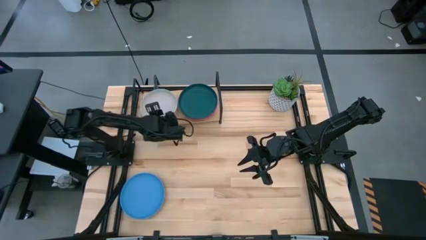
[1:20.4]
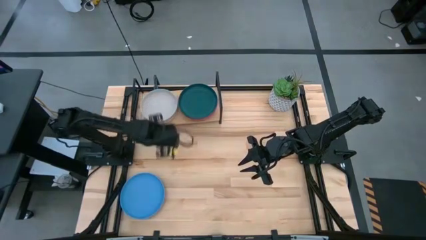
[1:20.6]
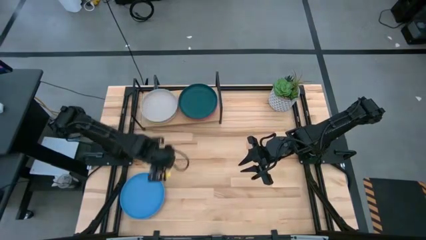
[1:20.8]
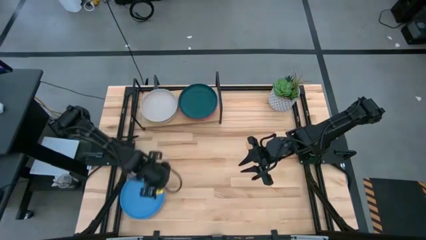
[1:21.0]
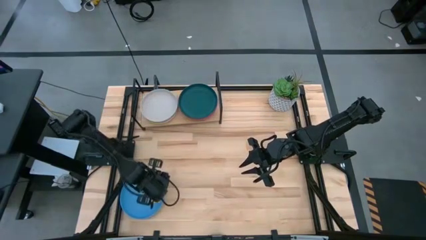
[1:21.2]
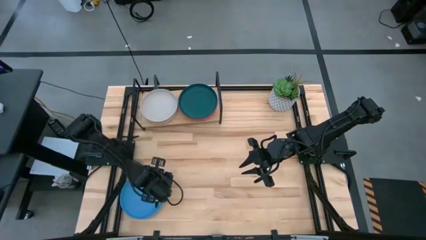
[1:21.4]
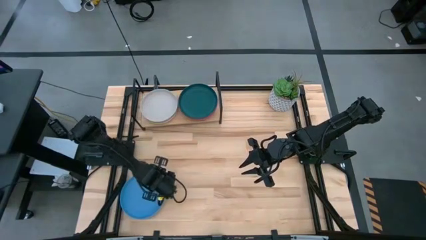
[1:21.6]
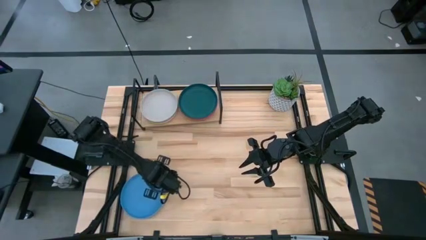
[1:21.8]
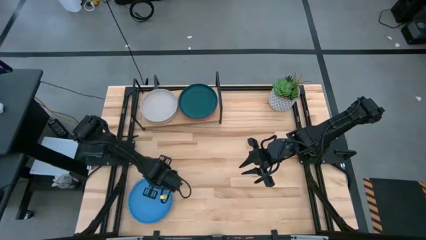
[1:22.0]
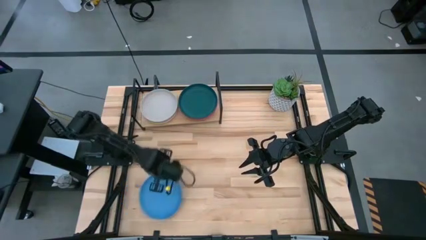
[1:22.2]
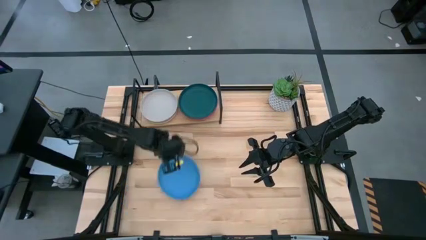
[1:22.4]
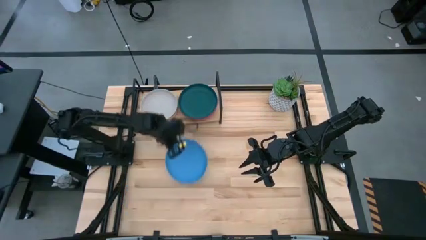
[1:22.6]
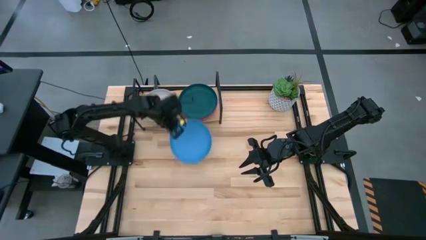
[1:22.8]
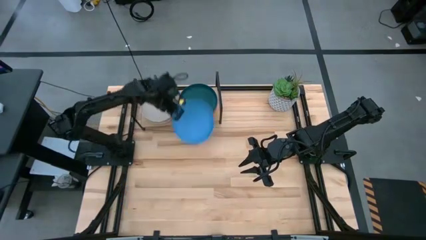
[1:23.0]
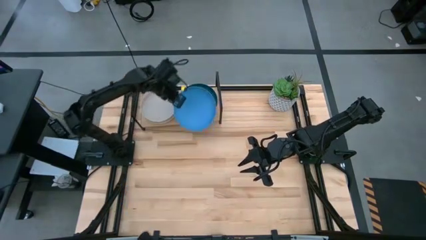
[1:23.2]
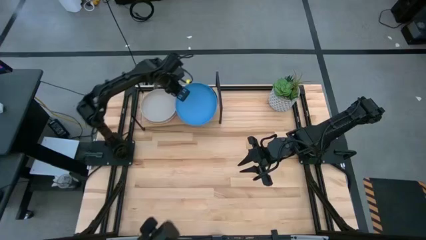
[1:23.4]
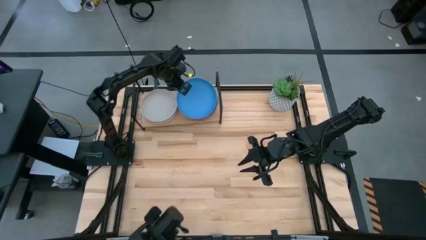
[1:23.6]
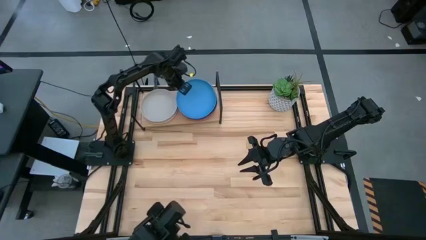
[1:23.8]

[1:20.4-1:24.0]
Task: Place and stack plates onto a shelf
Stack the blue plate on the dark blue plate

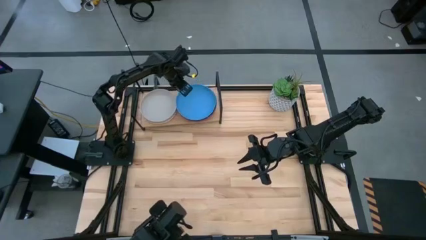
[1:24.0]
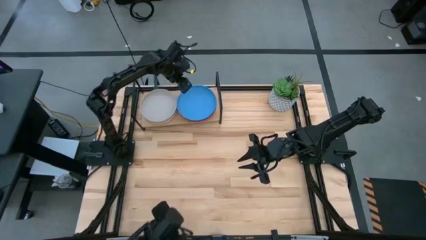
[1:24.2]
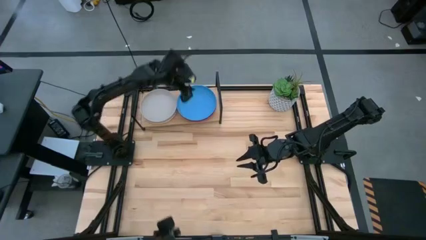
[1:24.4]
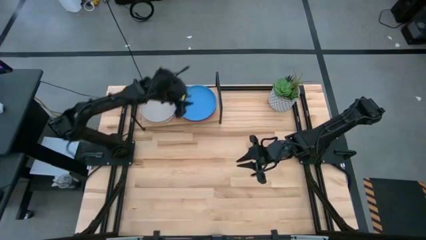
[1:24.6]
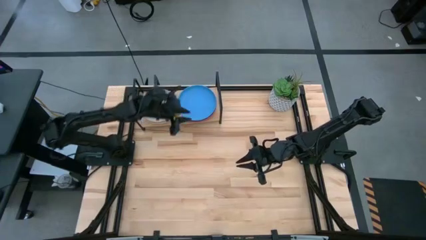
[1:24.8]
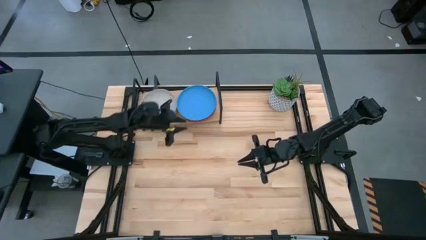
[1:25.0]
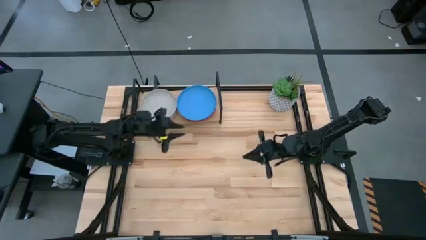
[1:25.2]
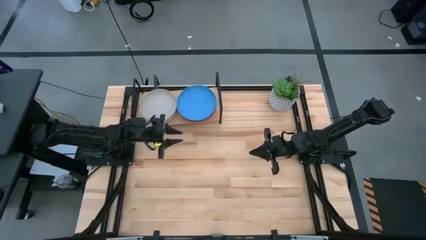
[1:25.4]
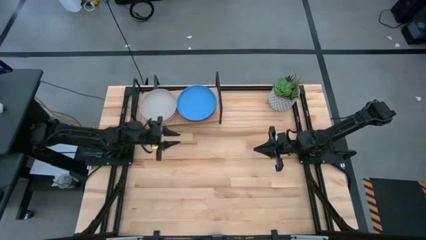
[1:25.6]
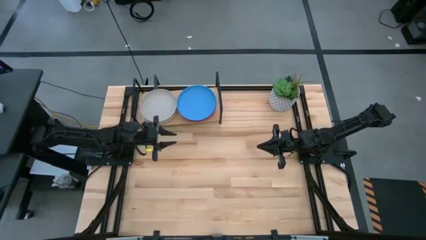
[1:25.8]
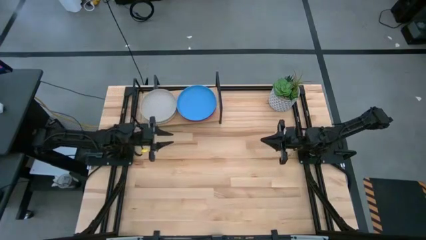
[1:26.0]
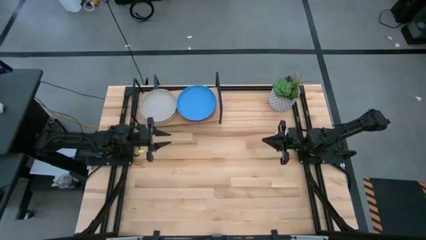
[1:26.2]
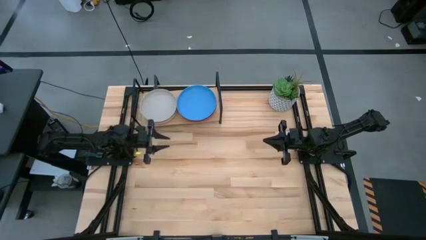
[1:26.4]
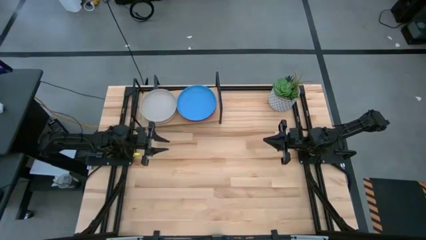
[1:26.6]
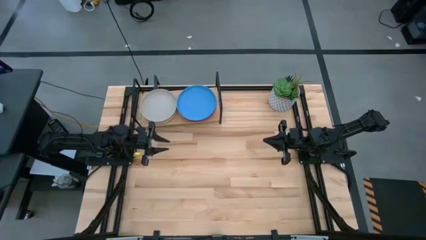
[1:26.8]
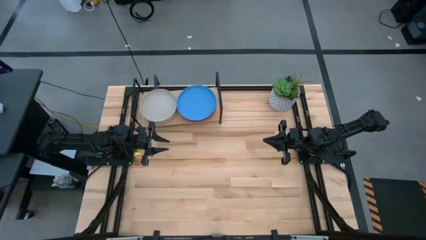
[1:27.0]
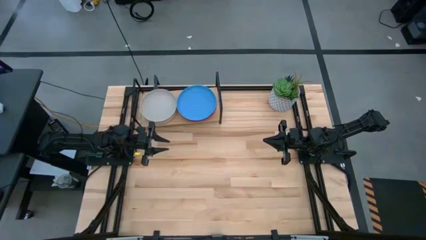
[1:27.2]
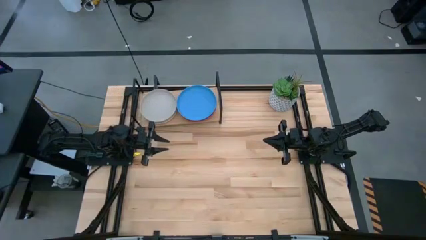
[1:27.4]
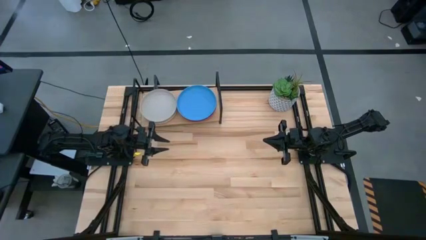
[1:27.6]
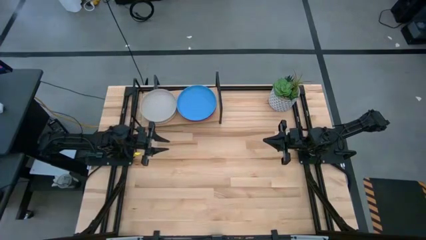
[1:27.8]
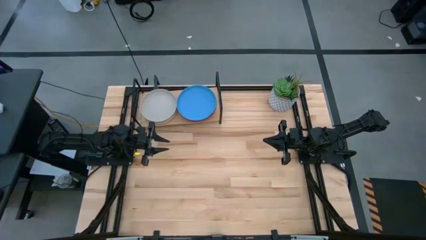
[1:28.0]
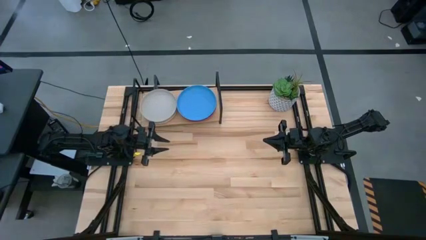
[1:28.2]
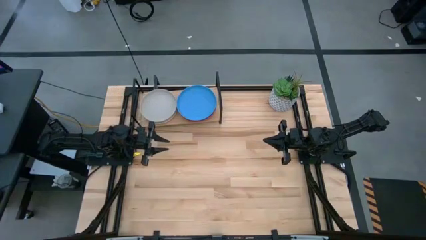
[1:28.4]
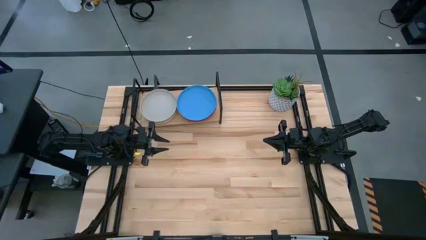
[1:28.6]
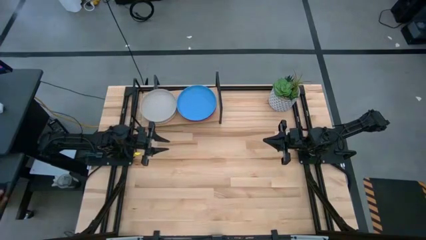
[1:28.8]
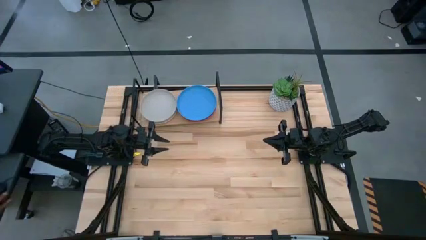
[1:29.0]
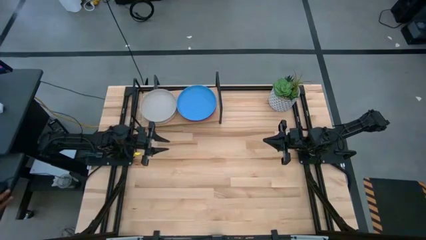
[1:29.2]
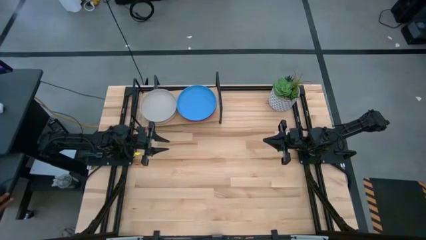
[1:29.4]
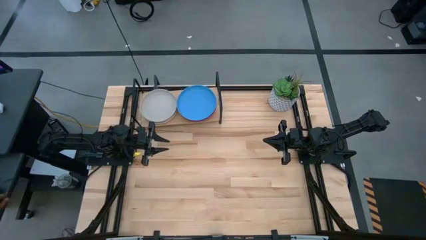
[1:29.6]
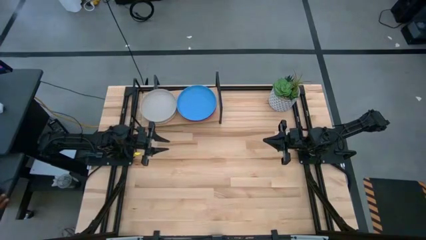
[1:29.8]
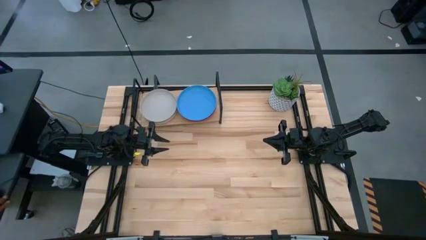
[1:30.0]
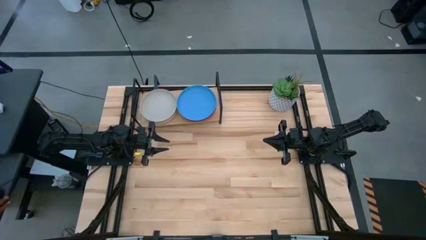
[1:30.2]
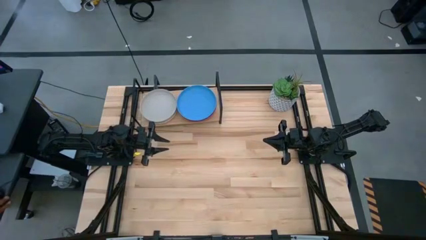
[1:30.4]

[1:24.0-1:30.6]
Return to Home Position

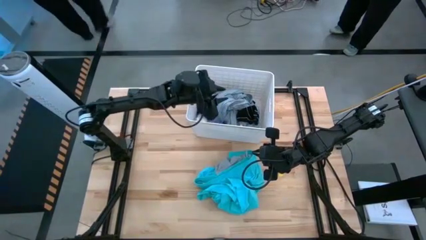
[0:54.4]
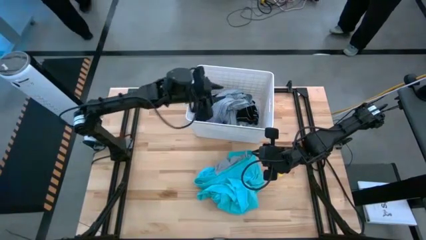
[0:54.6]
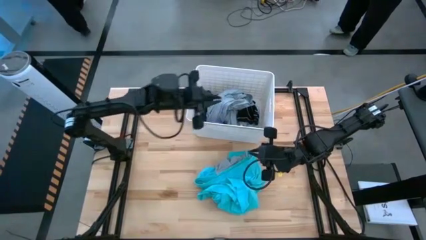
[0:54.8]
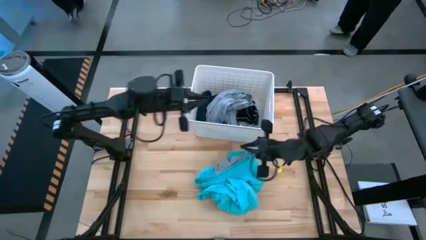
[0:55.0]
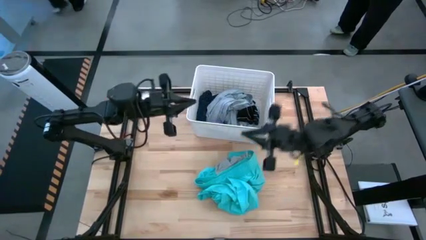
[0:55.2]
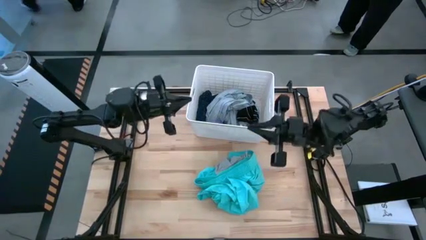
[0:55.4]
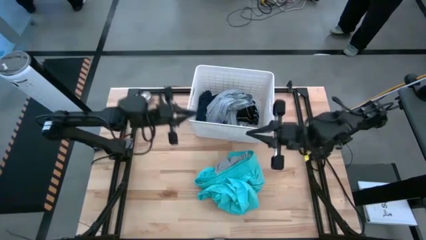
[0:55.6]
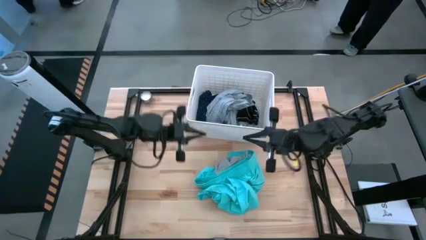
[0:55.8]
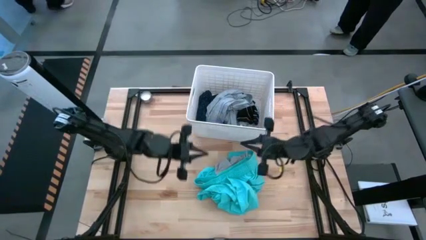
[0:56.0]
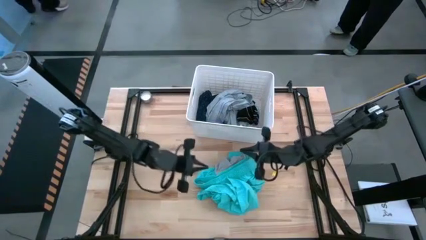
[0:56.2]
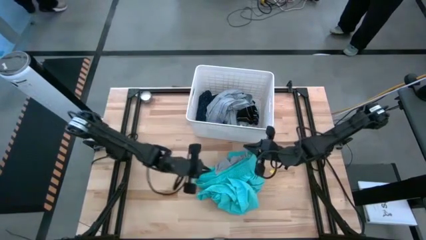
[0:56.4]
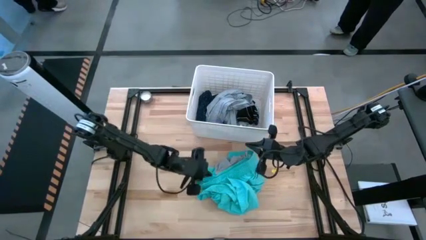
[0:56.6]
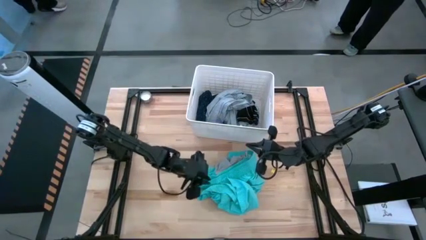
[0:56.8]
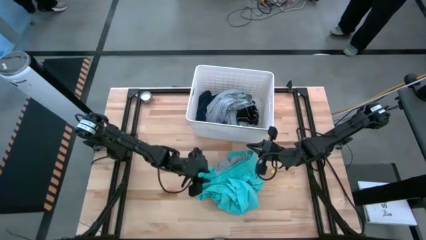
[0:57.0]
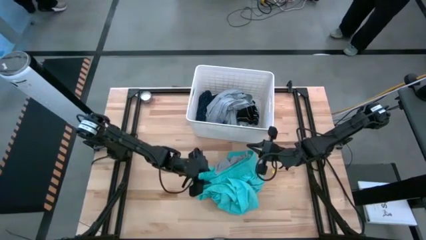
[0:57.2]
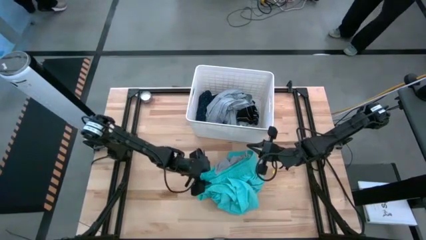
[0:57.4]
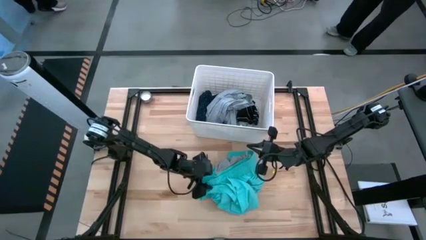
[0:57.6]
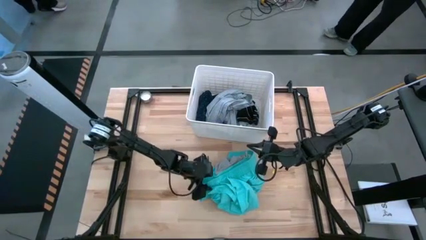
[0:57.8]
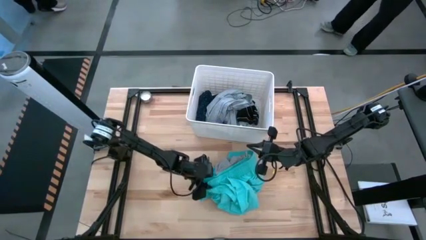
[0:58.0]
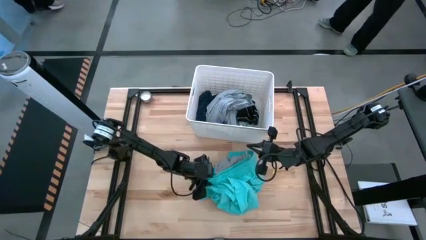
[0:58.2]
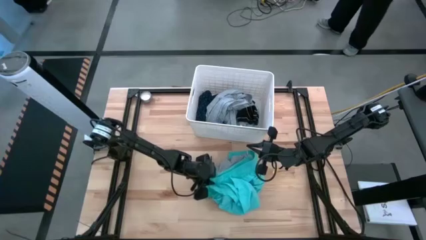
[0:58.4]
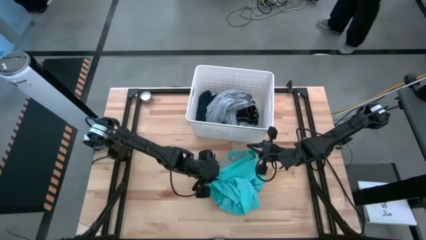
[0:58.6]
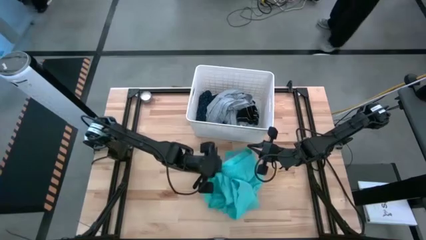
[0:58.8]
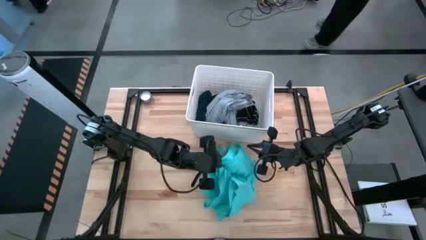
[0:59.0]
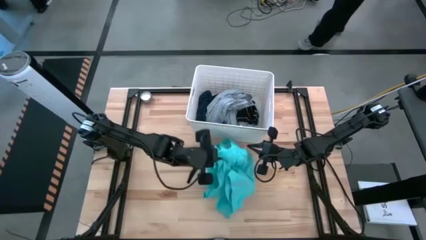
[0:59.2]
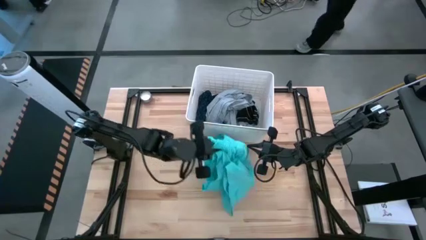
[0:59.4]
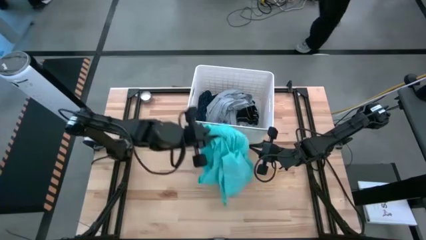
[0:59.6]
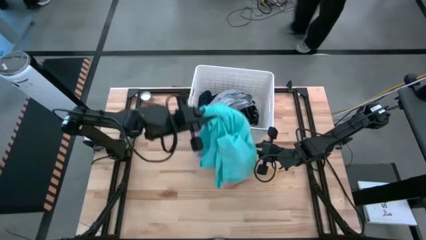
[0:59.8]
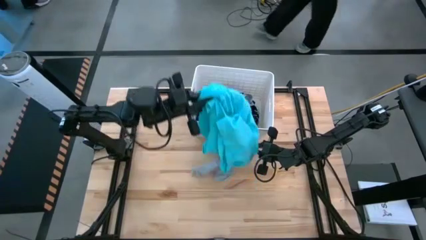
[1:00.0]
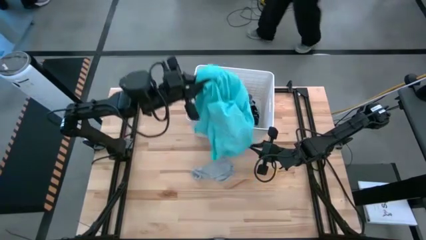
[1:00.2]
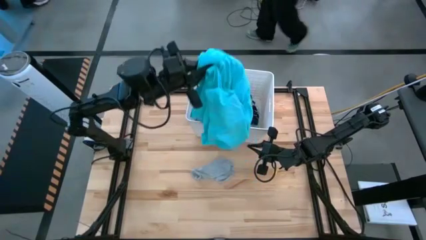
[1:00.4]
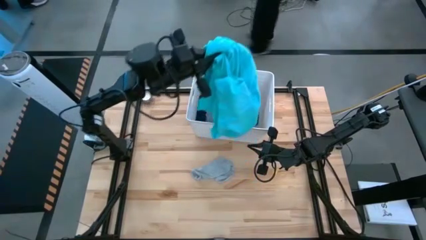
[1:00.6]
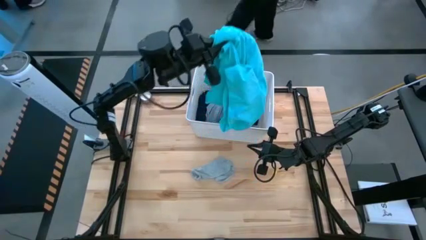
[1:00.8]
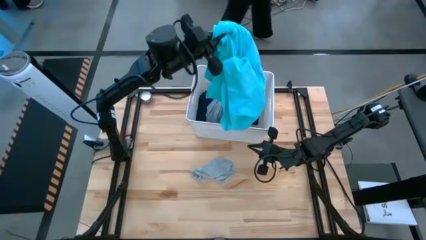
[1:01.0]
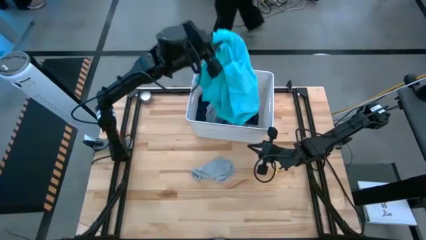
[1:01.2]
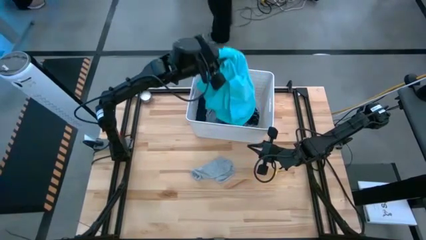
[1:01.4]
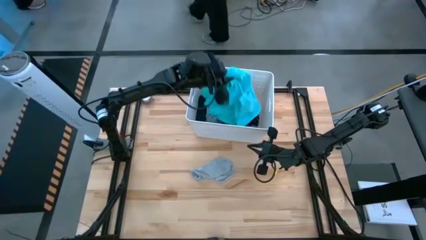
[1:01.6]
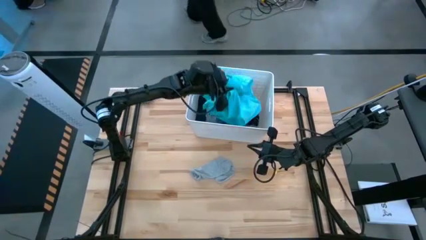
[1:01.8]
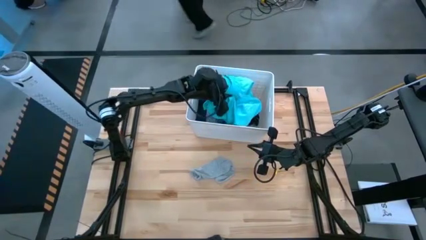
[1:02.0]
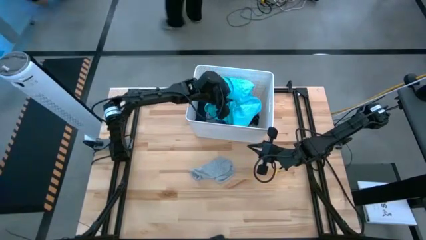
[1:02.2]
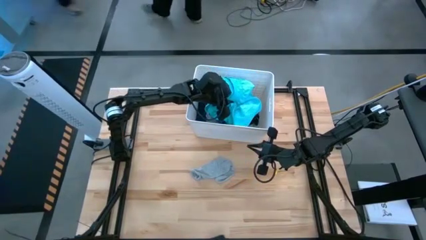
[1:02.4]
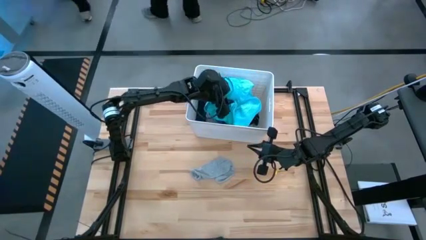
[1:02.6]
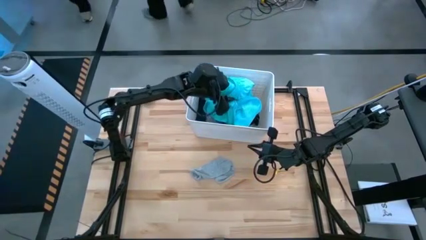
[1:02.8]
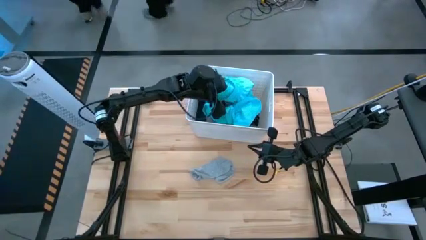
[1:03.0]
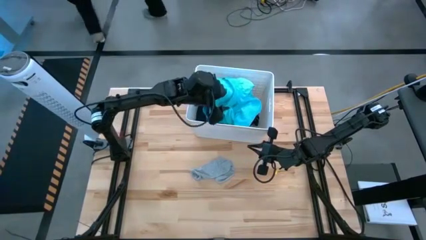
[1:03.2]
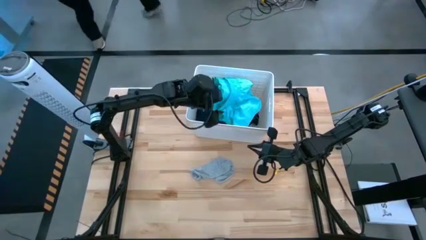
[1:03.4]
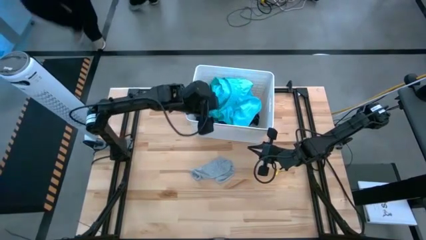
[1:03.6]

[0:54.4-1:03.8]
Task: Sort clothes
Put the blue shorts into the laundry bin
